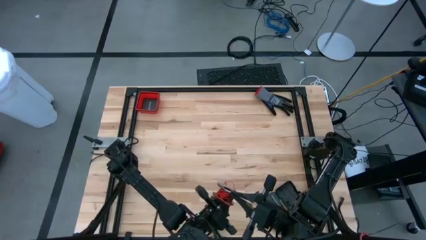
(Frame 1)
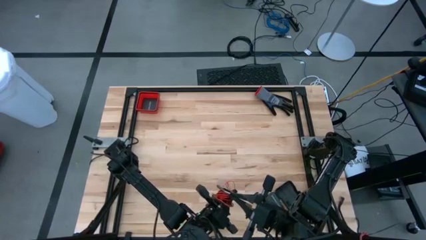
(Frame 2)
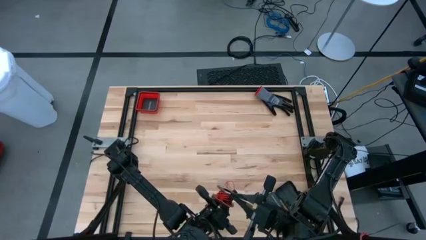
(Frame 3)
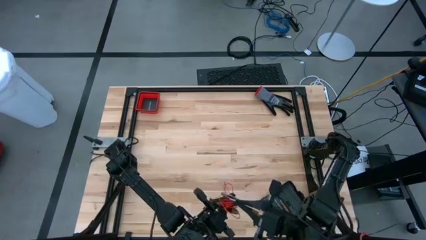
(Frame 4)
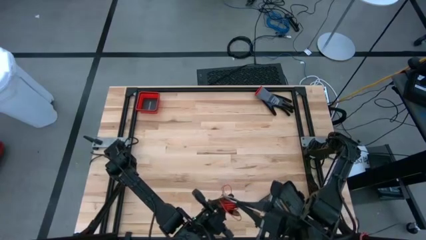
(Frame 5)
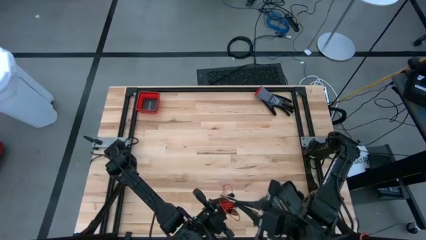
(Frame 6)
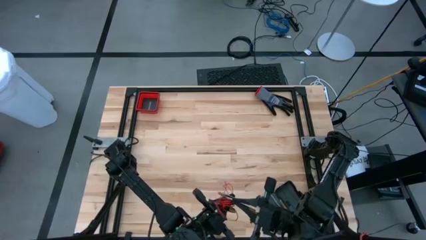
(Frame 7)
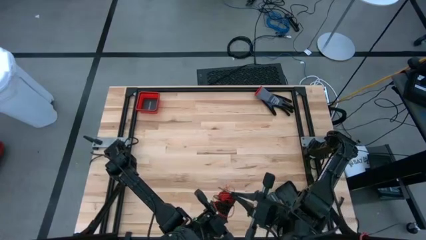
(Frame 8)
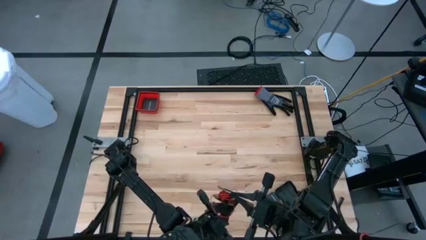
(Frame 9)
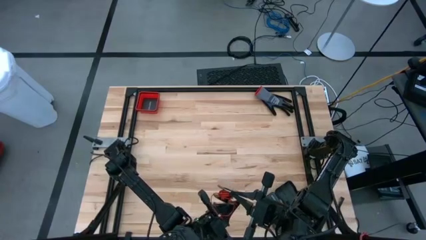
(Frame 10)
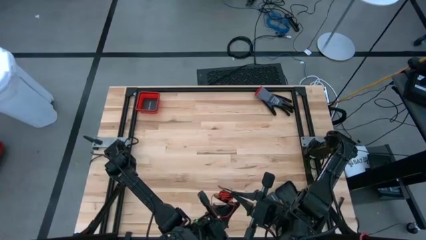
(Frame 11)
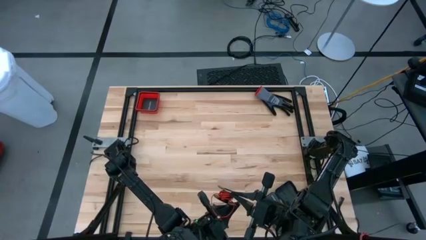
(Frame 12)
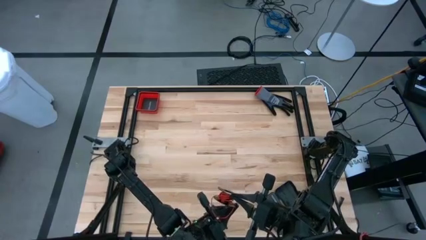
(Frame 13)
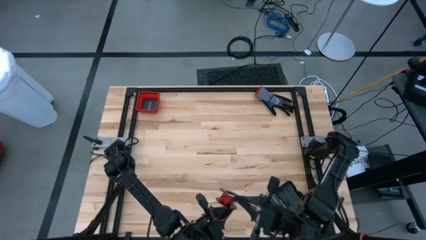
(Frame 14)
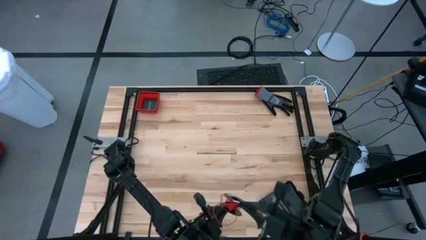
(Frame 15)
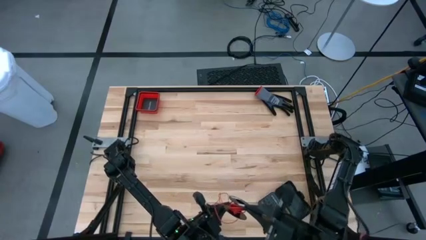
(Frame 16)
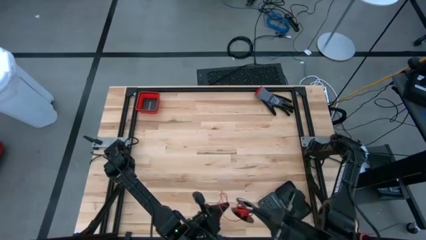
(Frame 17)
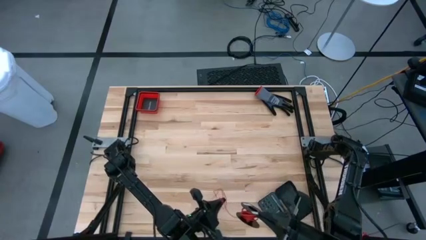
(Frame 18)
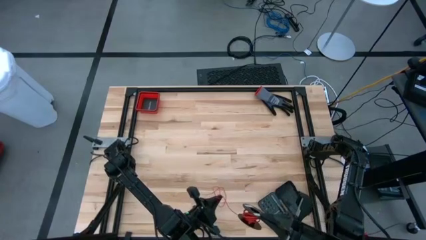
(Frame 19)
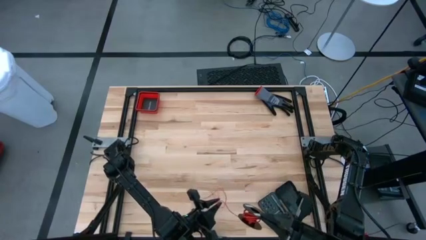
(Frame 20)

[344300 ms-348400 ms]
Task: Coil cords
Coil the red wire onto the spool

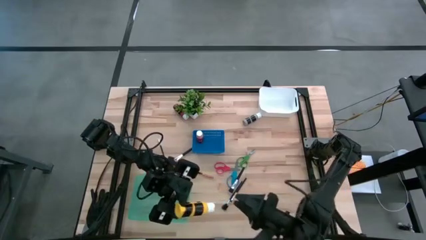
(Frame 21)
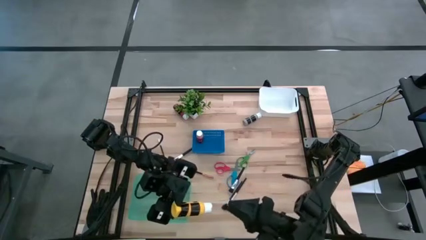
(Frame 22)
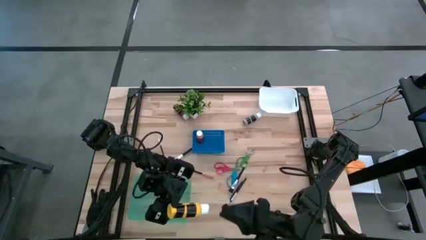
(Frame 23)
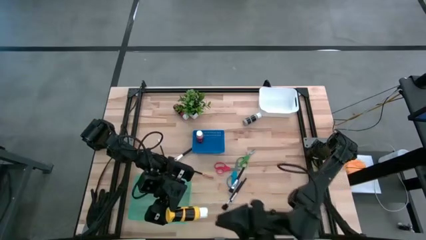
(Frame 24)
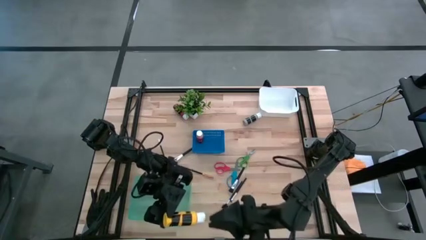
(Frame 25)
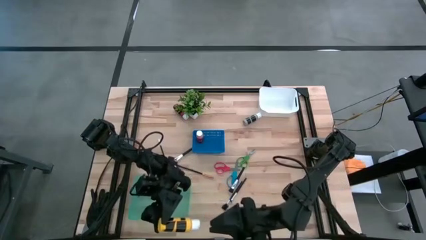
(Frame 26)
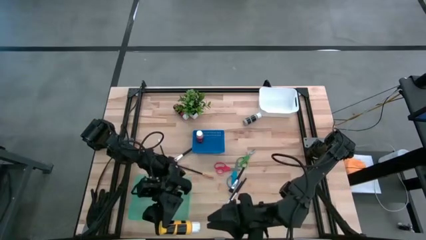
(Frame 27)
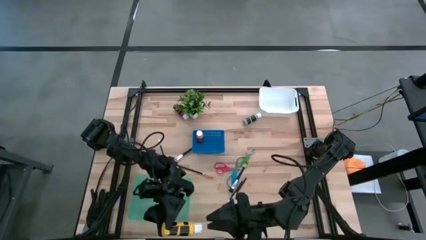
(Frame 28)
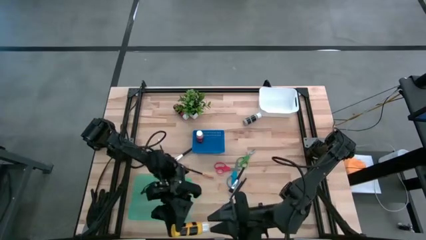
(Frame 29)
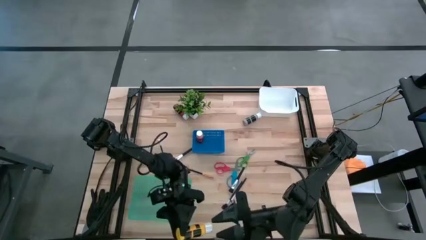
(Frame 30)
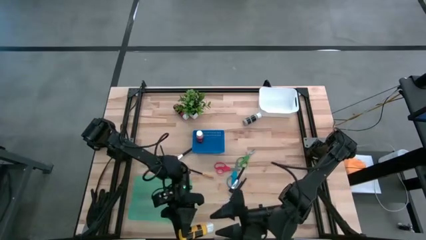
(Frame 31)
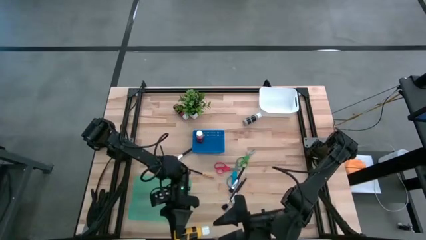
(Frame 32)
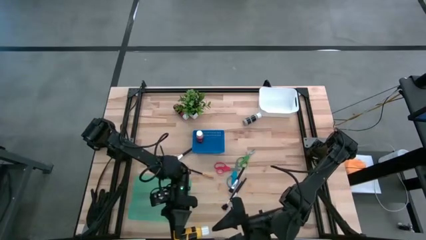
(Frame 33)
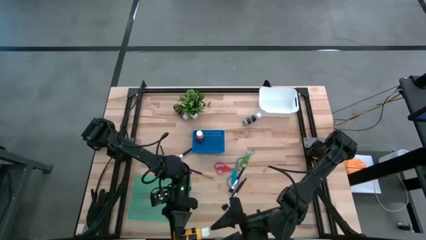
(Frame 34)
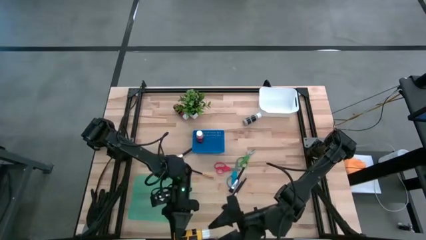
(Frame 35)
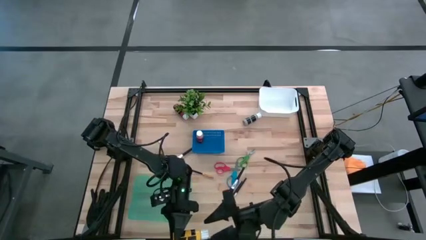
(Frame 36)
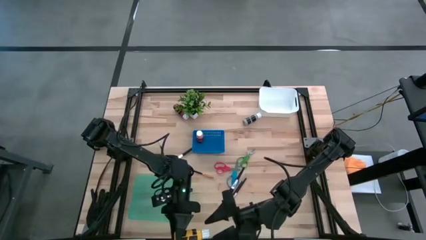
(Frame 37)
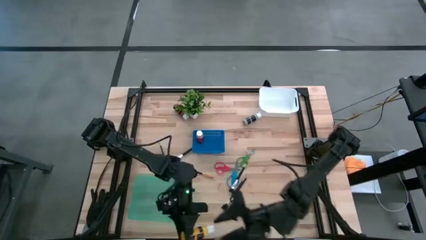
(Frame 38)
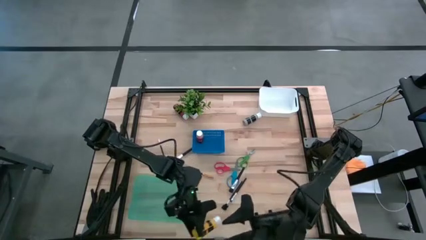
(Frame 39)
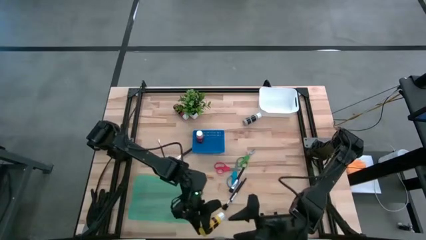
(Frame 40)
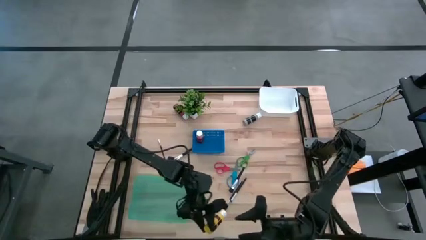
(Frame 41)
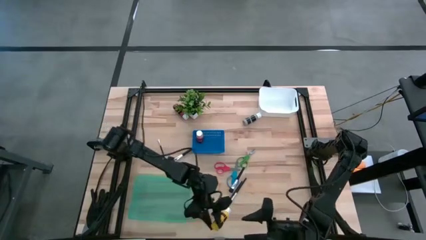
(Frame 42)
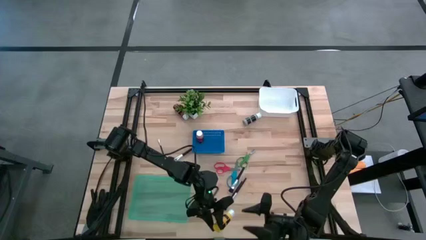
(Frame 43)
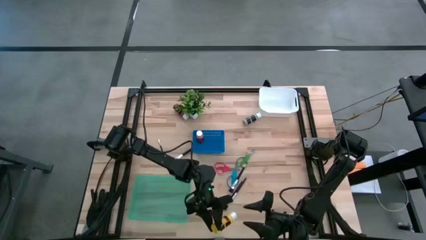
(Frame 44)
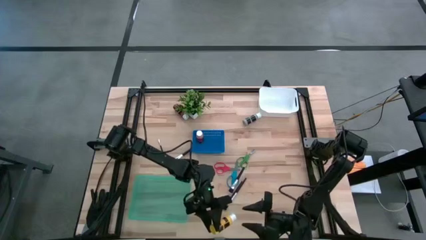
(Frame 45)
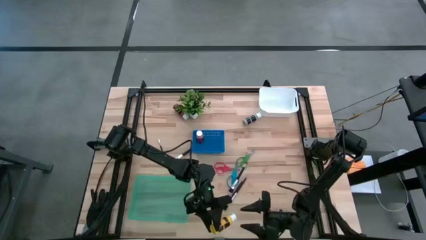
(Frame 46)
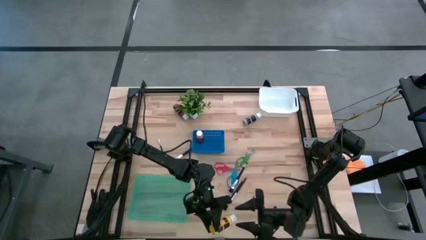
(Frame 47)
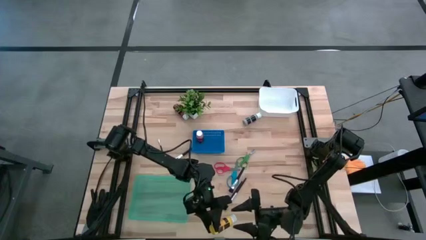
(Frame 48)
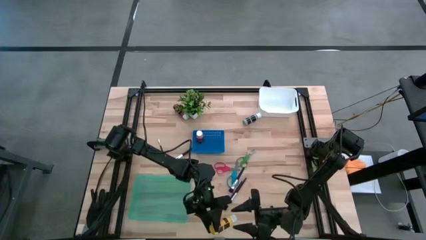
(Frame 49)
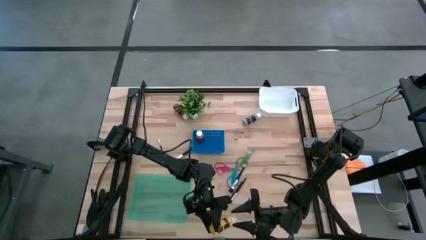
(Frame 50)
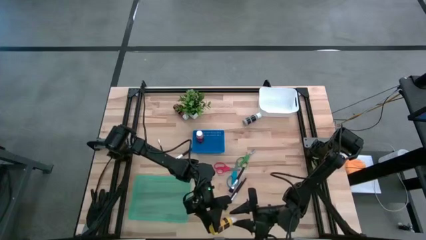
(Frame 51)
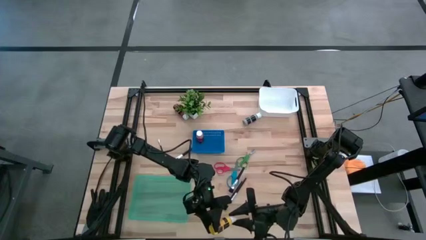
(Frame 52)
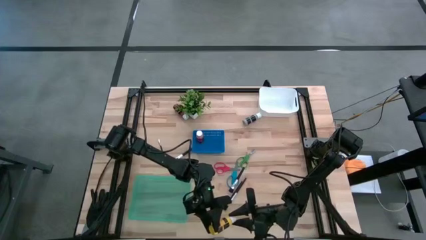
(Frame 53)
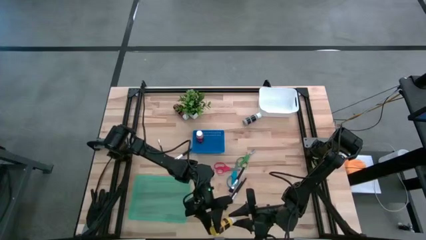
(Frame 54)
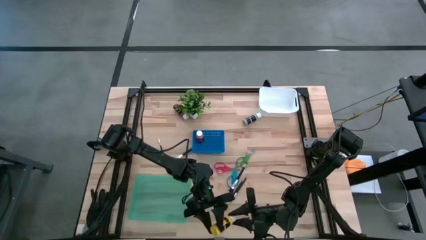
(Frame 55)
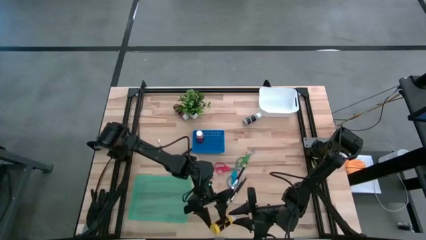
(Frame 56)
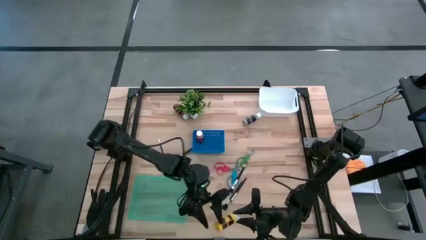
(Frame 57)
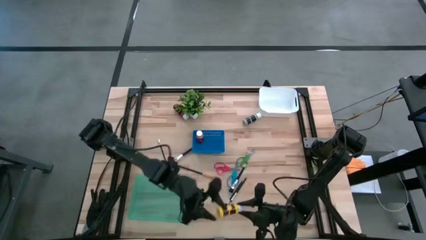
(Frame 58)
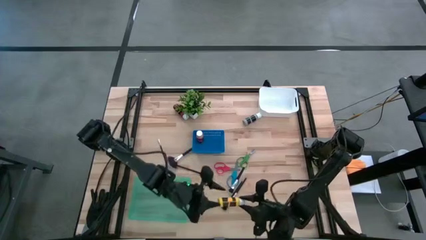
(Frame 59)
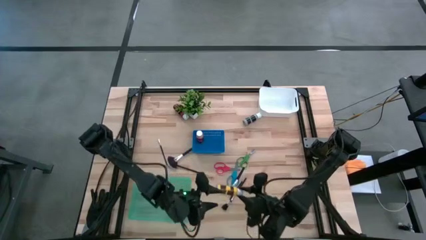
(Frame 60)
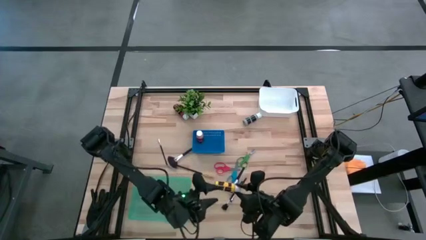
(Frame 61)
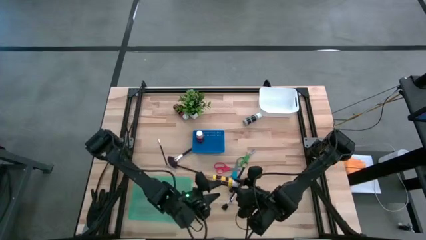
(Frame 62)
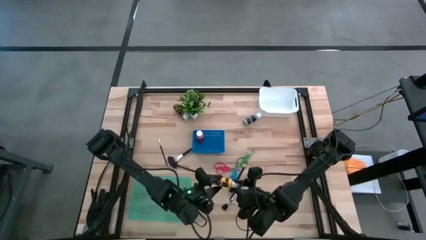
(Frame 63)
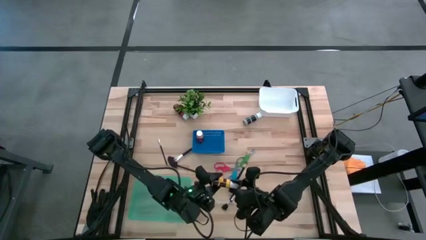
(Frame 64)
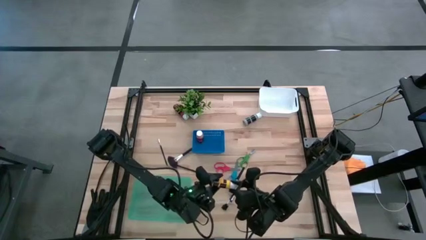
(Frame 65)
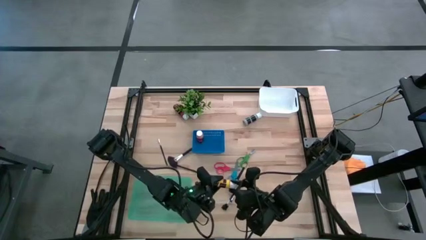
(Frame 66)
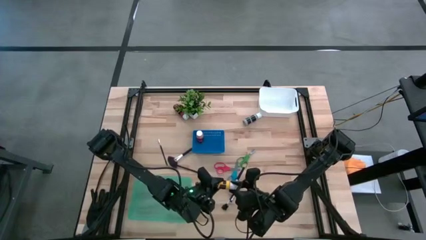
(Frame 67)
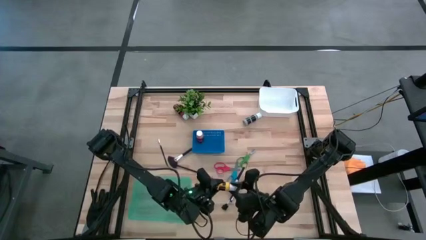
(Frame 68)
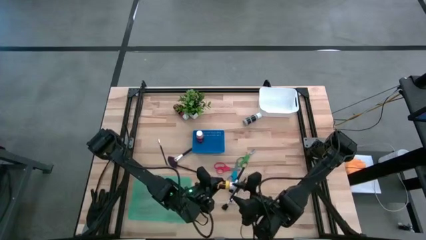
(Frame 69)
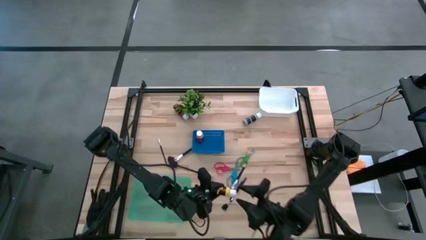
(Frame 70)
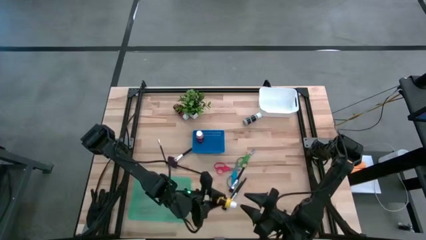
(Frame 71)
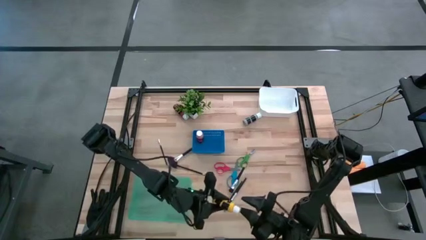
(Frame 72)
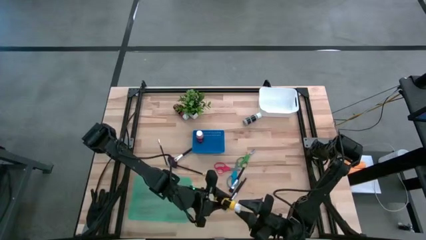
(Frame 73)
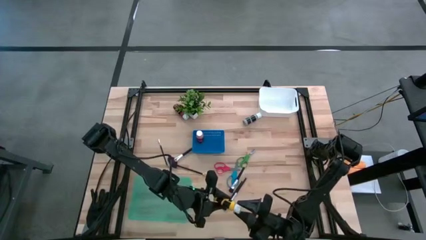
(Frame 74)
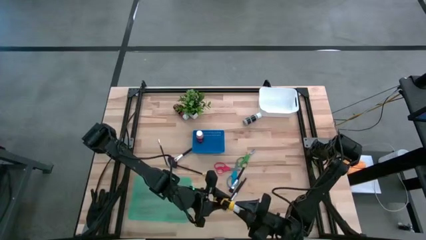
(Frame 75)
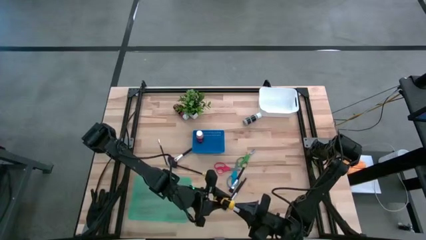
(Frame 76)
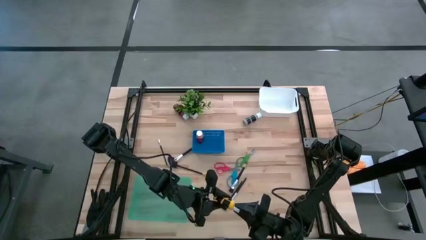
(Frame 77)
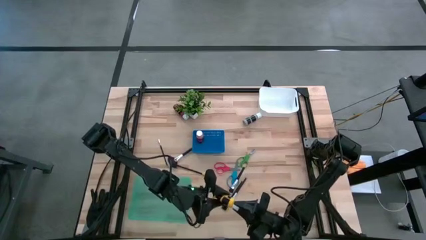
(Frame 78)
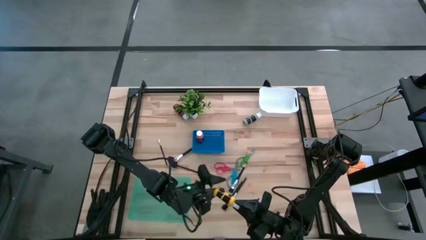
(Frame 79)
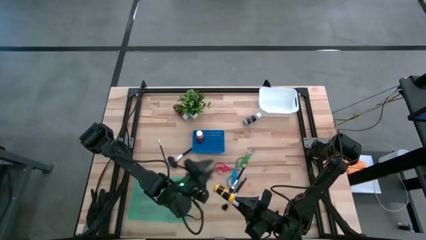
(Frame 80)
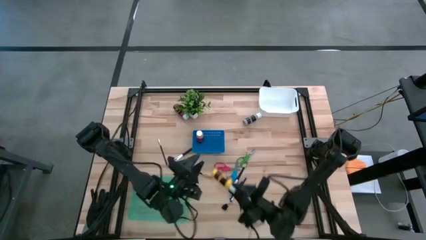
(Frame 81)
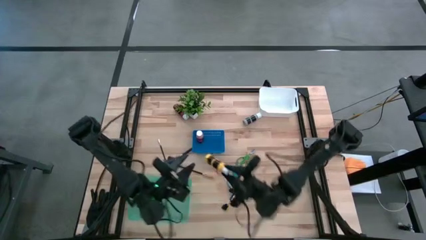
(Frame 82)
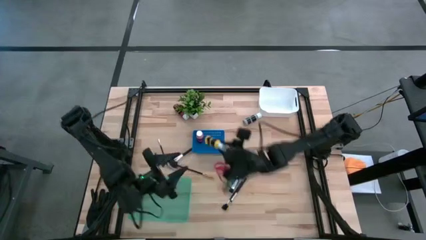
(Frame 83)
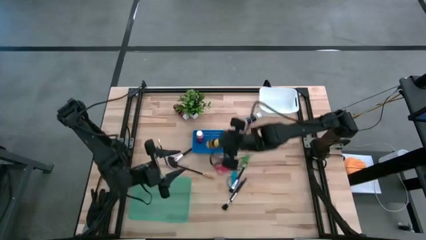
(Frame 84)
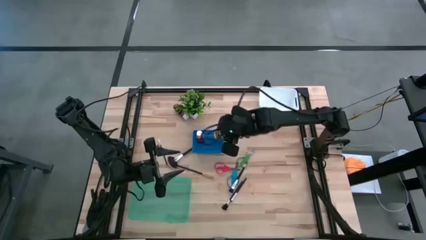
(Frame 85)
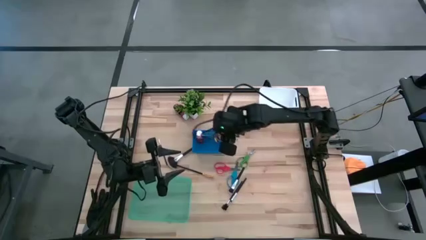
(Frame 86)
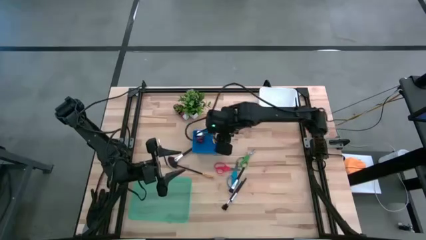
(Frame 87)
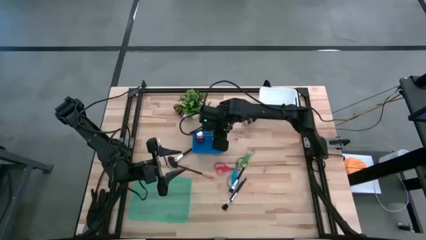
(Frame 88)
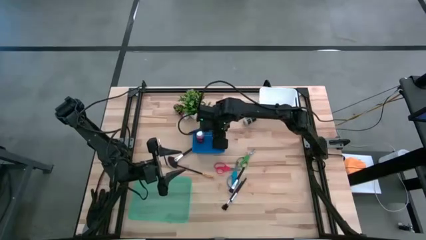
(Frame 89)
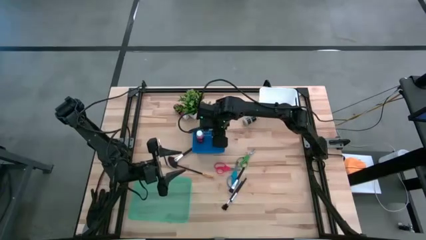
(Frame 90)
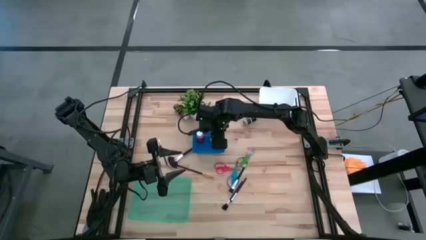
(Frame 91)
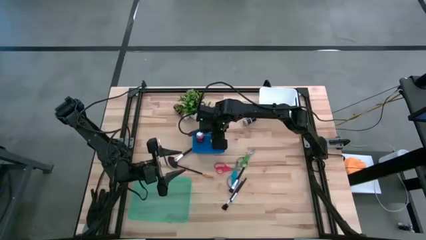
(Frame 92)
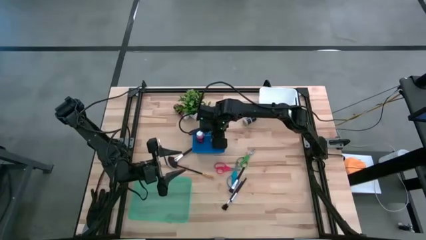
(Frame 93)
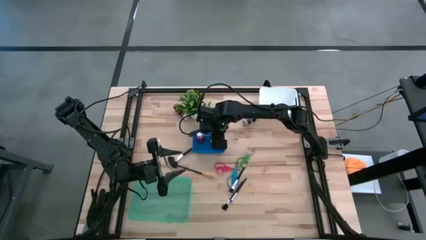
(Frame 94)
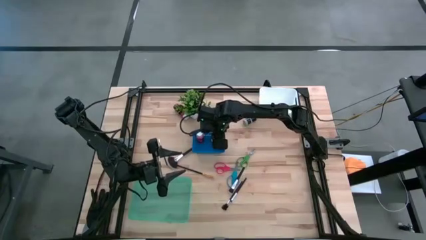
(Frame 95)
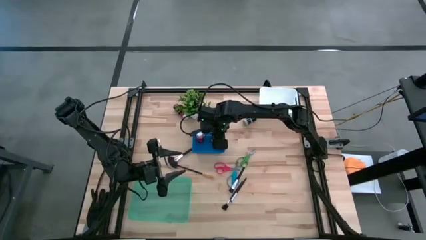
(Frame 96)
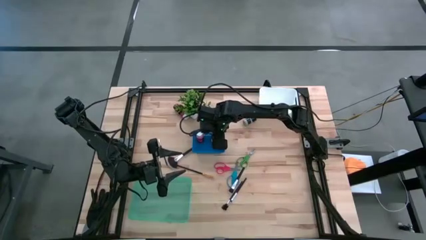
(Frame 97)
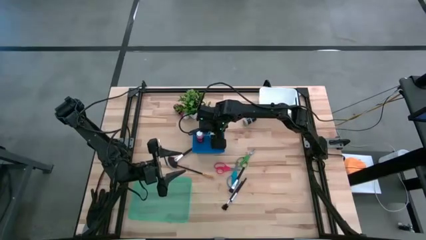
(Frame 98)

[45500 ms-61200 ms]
Task: Pick & Place Paint Supplies
Put the yellow paint into the blue bin
